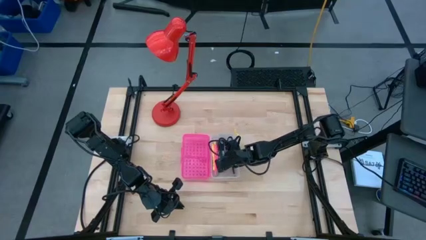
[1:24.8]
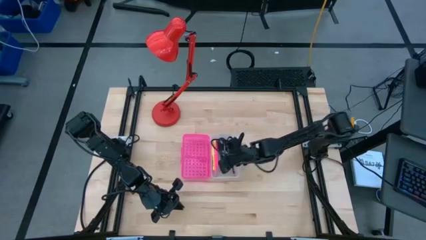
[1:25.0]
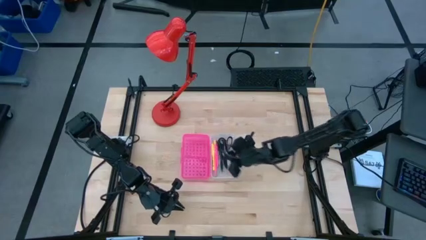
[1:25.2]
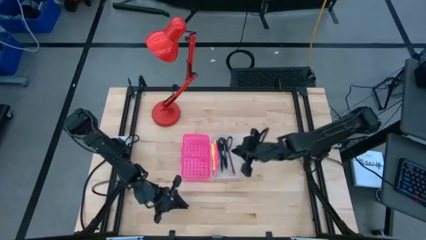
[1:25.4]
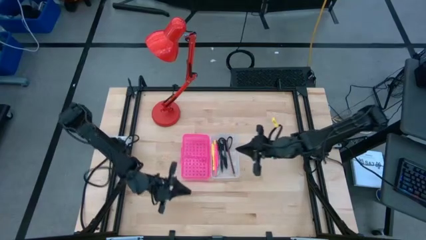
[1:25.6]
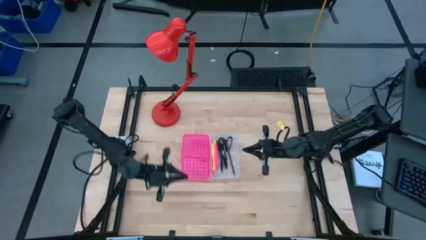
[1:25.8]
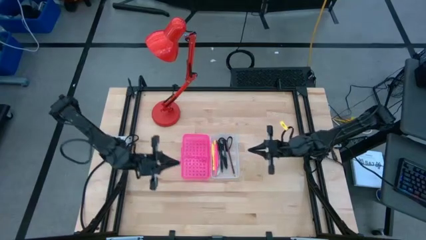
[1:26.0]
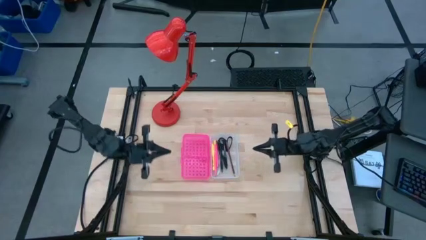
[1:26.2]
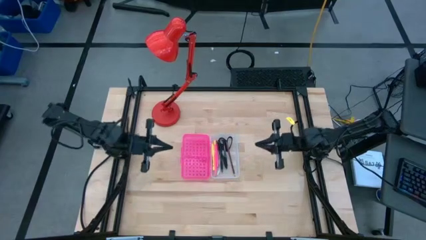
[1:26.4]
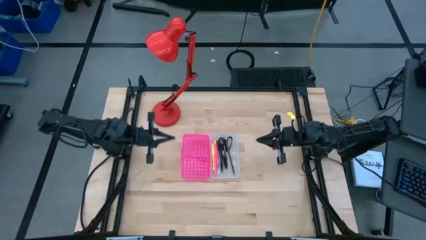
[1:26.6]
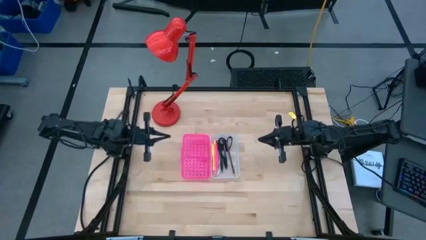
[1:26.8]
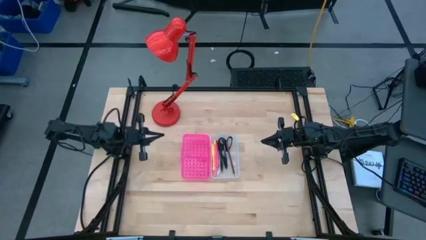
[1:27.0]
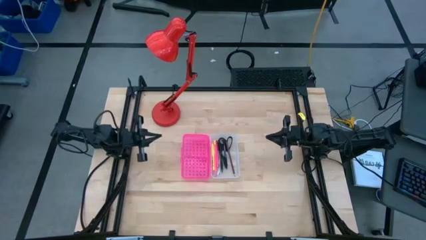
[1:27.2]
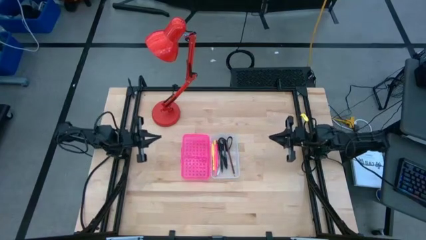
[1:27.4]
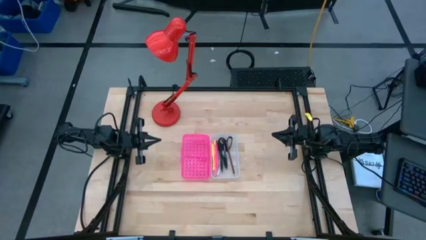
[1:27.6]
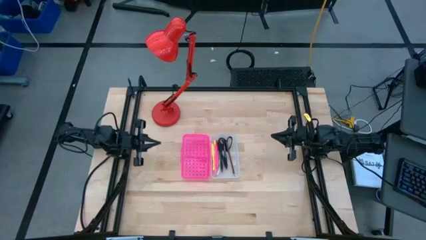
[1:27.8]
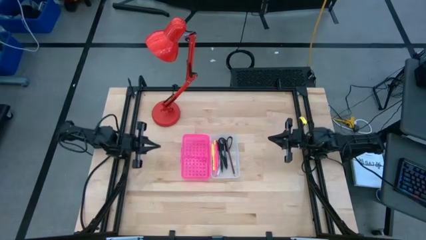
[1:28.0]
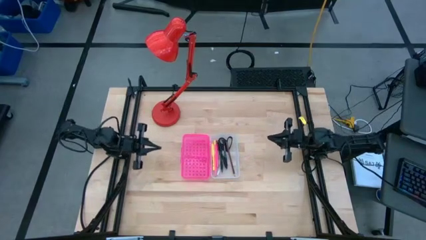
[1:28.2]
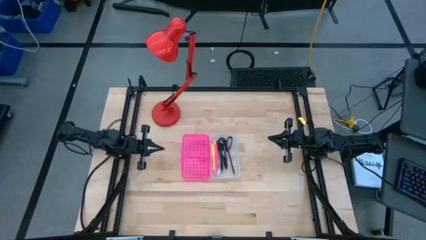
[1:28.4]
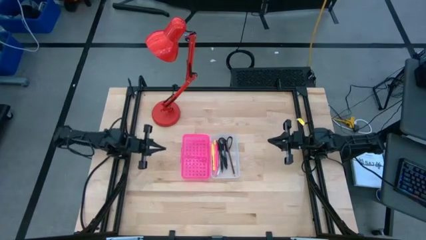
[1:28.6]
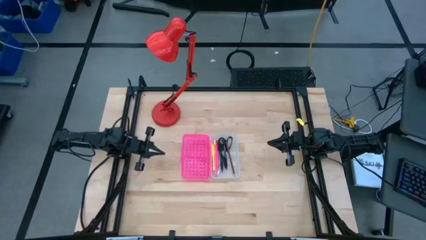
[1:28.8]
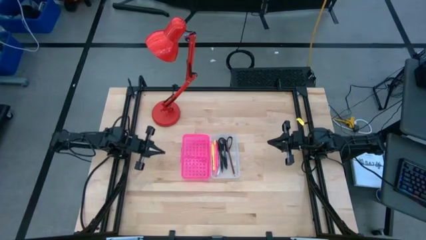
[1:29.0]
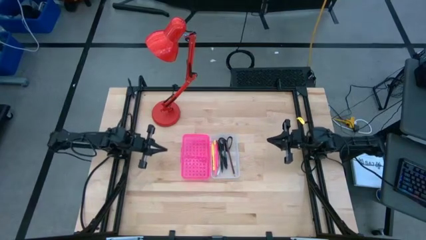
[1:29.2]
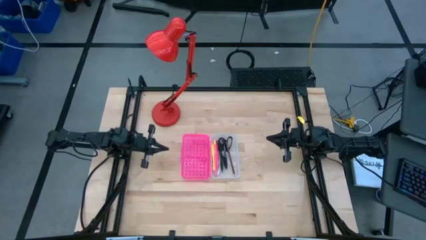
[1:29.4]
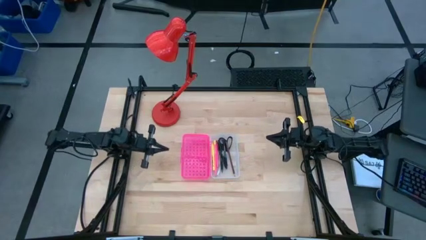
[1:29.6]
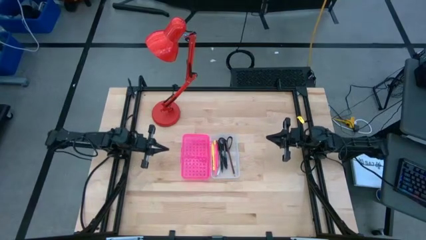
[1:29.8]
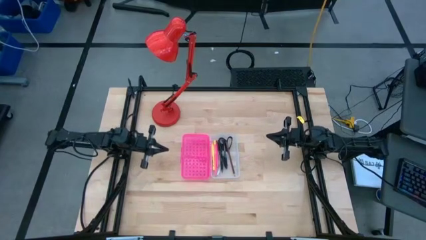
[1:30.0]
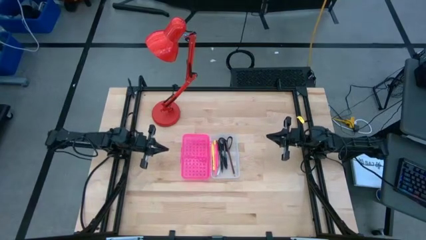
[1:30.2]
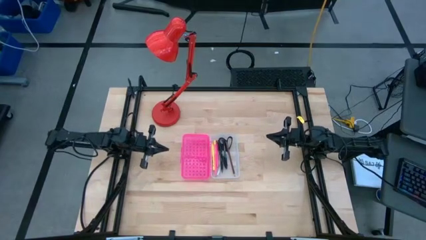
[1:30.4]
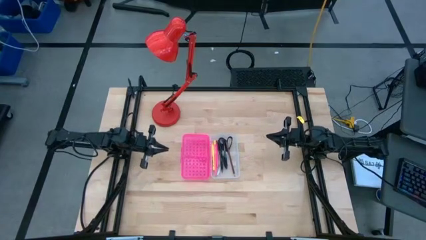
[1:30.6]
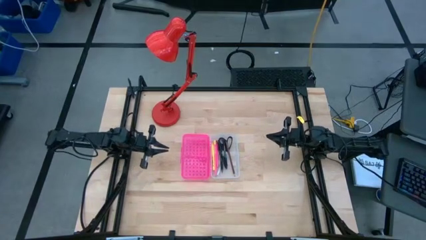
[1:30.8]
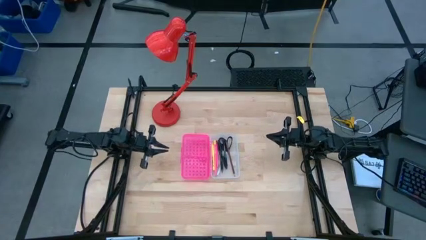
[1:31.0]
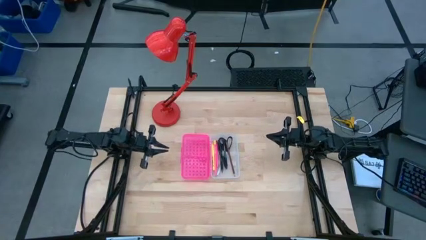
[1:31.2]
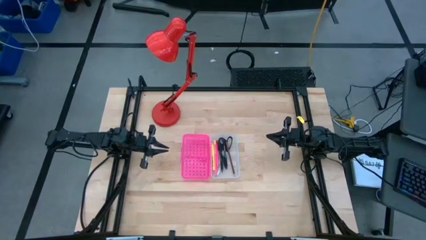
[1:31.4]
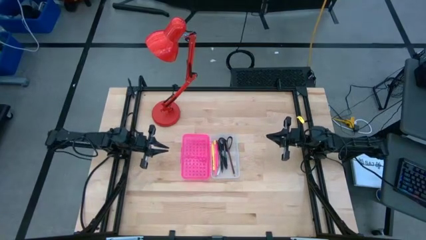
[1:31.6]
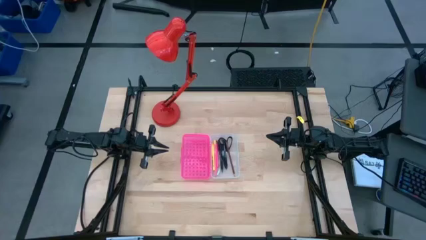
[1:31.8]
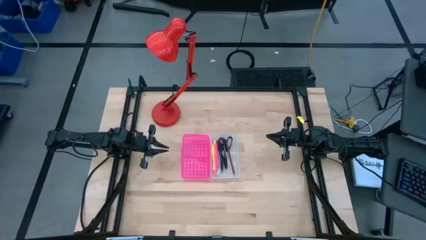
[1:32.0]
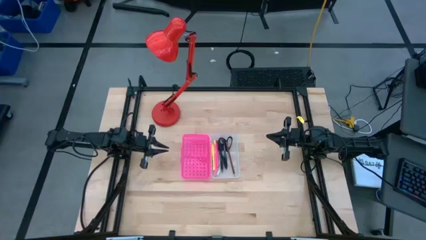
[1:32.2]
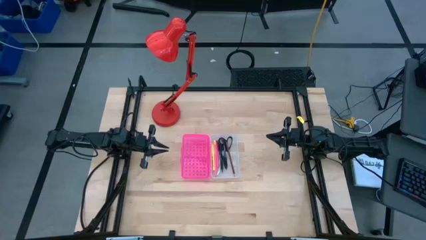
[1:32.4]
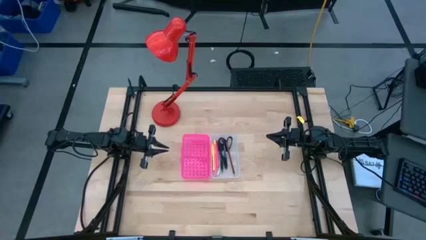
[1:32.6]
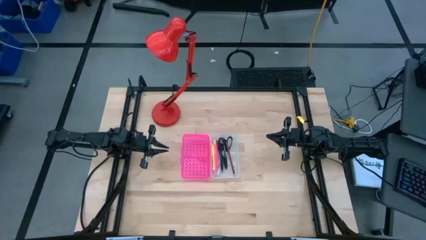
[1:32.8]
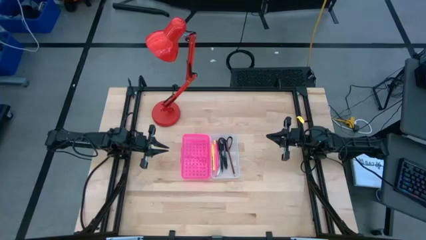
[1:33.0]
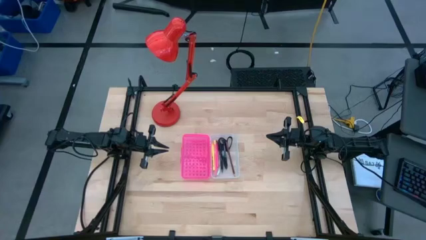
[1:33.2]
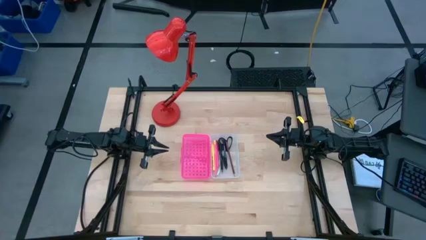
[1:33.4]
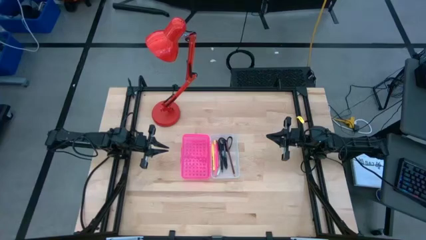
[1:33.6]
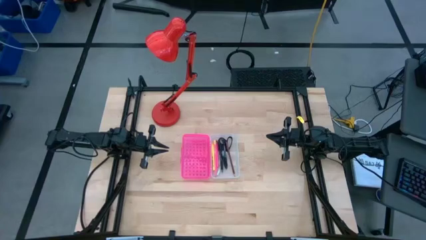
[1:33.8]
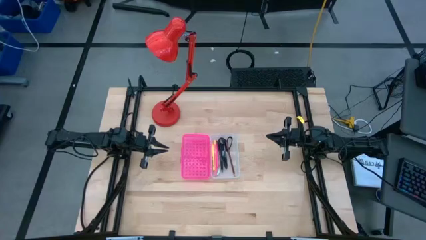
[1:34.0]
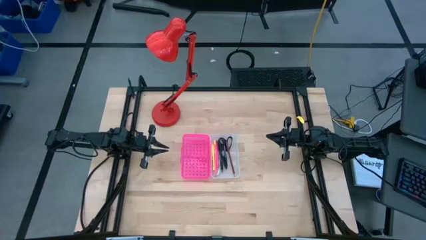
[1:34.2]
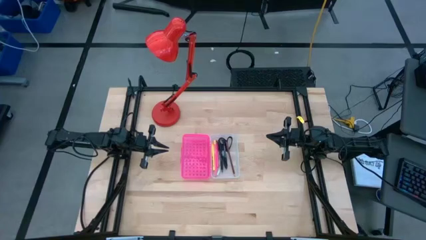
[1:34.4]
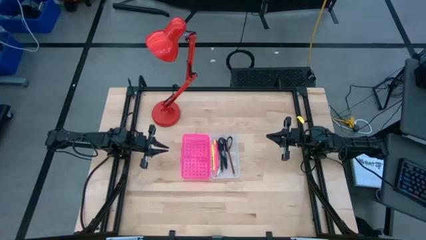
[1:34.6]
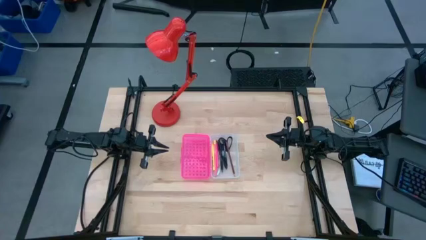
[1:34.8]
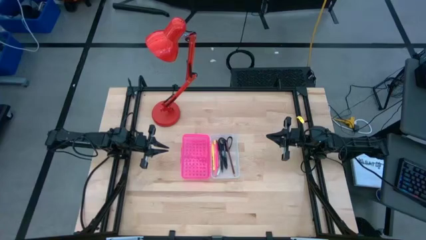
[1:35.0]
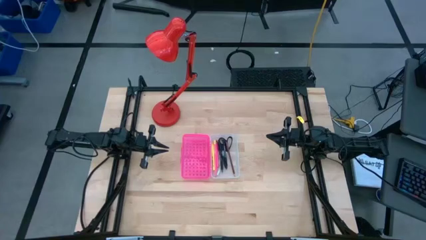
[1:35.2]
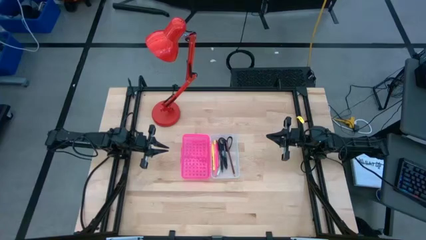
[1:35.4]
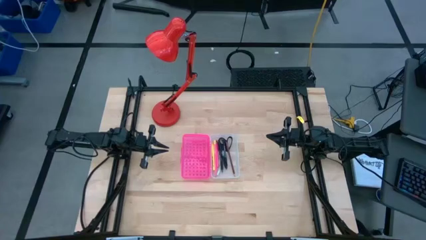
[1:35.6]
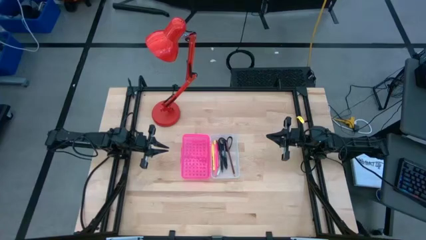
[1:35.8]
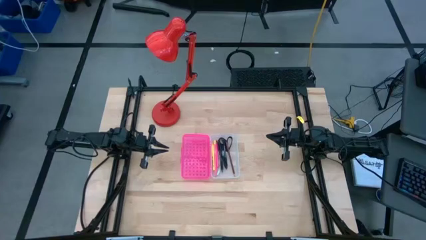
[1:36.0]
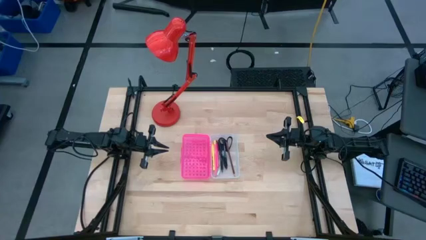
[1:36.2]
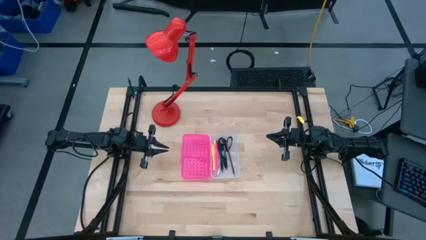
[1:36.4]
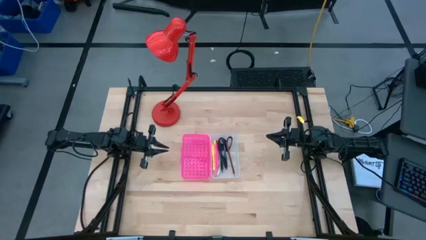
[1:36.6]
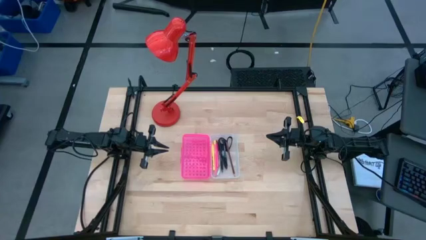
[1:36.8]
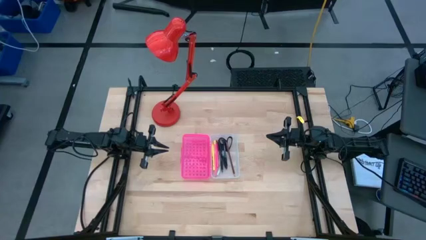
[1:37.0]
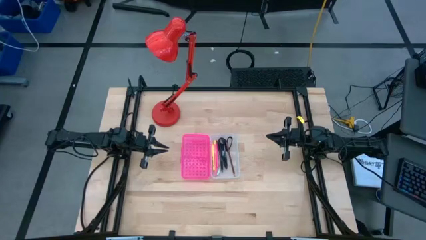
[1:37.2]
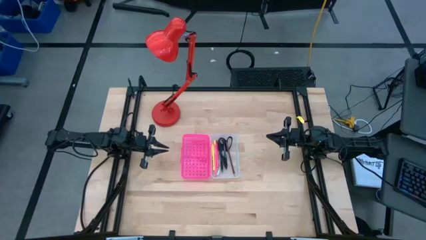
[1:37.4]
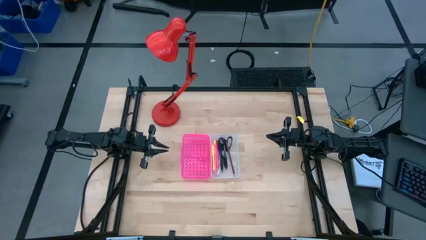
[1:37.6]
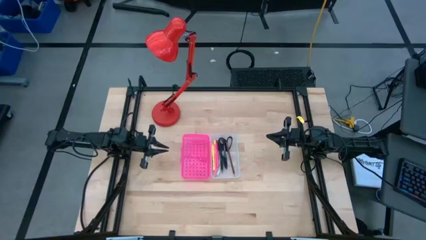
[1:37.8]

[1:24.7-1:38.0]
Task: Pick & place school supplies into a supply box
Return to Home Position
